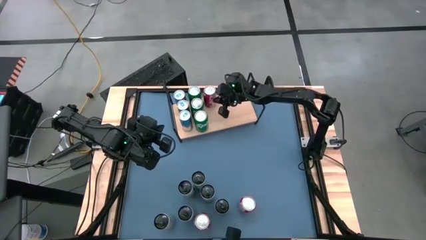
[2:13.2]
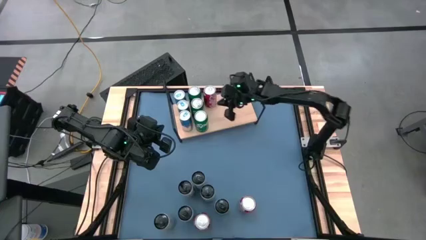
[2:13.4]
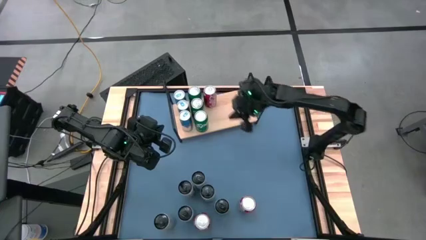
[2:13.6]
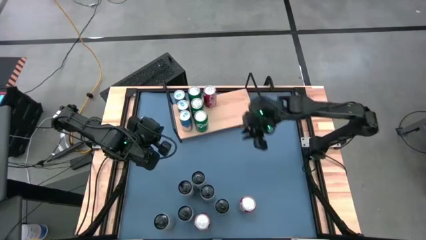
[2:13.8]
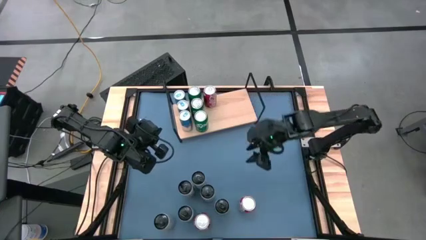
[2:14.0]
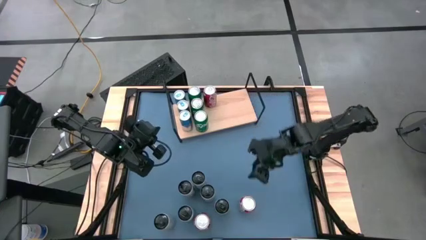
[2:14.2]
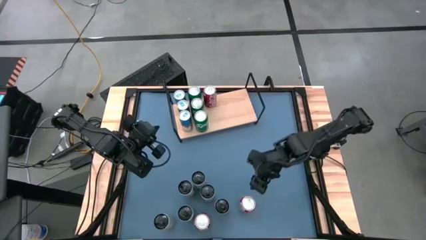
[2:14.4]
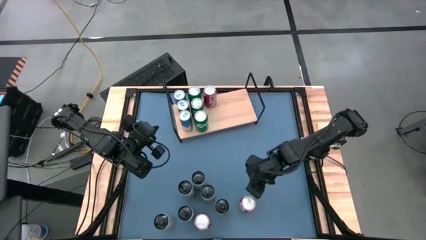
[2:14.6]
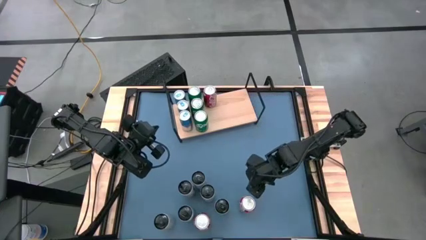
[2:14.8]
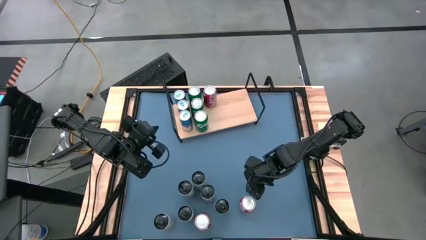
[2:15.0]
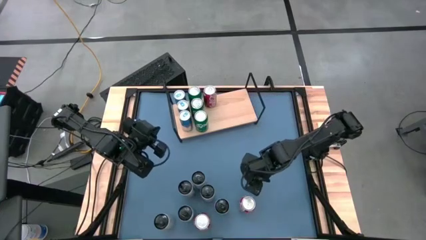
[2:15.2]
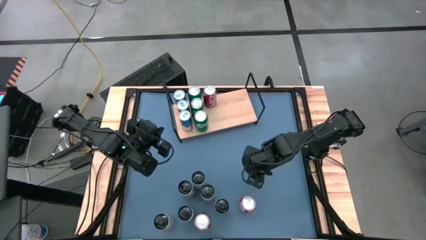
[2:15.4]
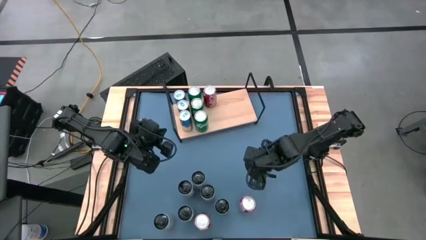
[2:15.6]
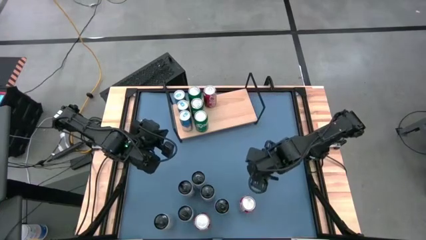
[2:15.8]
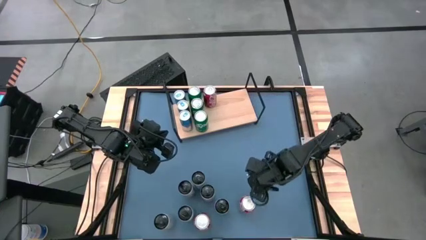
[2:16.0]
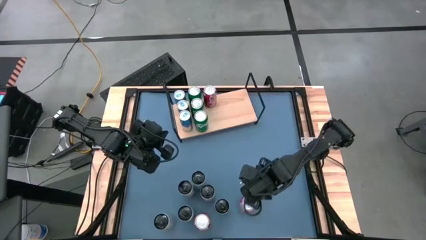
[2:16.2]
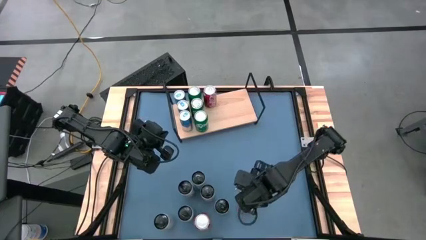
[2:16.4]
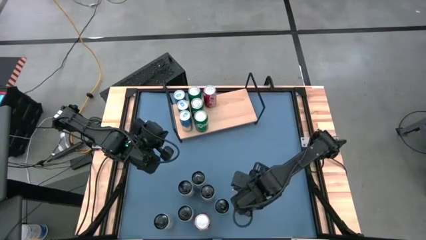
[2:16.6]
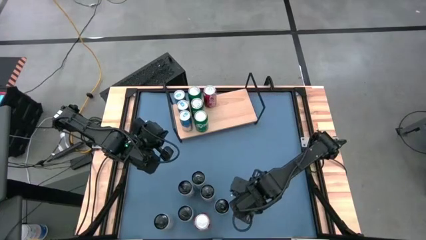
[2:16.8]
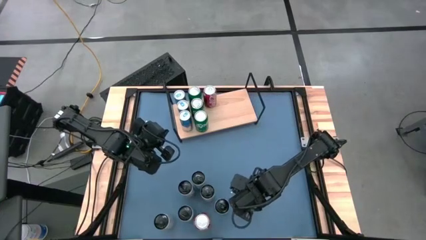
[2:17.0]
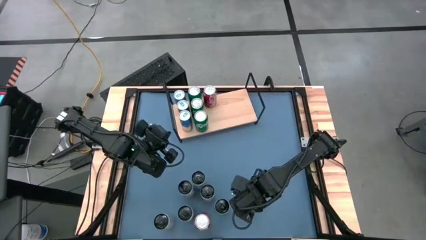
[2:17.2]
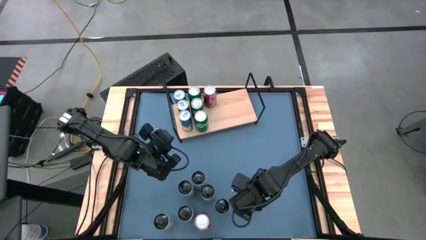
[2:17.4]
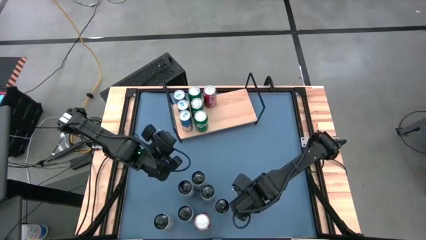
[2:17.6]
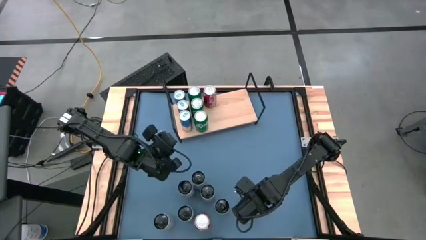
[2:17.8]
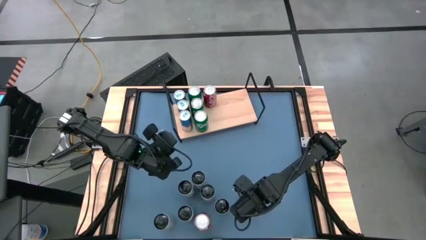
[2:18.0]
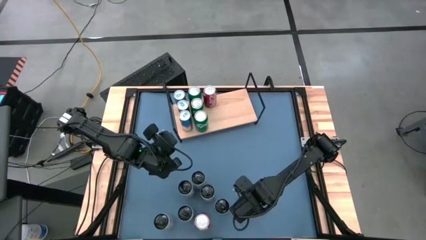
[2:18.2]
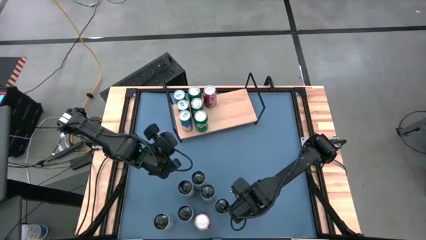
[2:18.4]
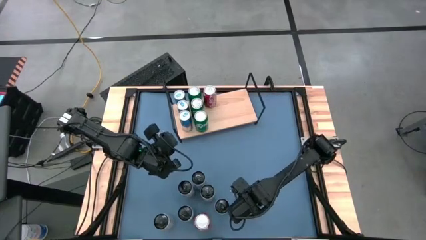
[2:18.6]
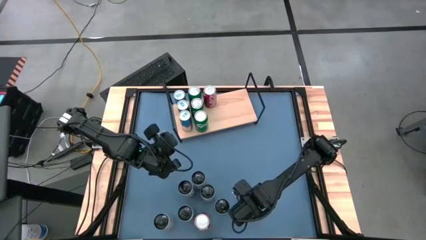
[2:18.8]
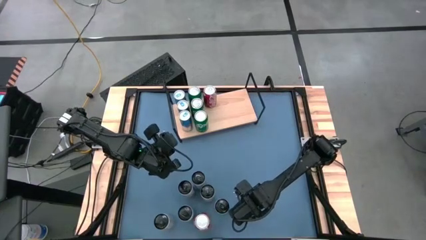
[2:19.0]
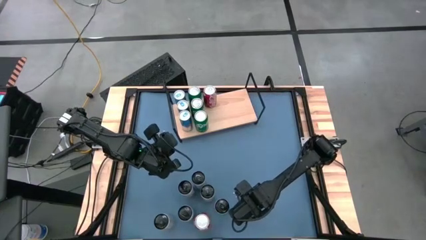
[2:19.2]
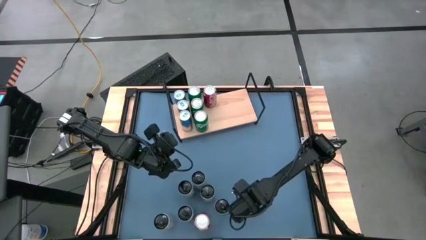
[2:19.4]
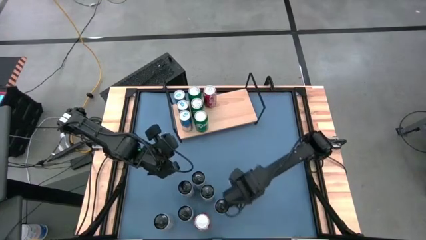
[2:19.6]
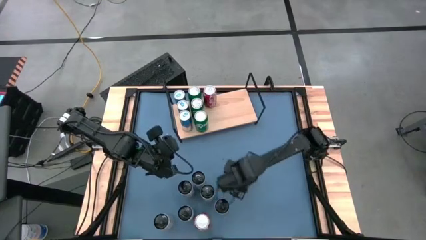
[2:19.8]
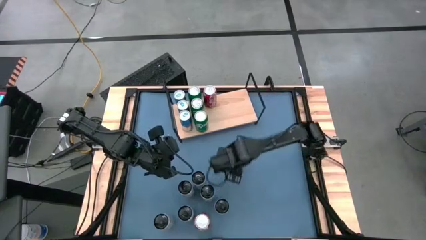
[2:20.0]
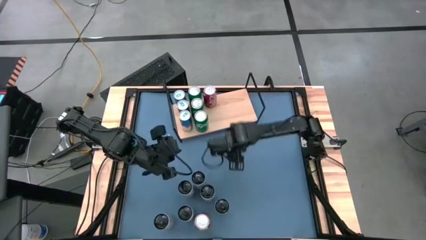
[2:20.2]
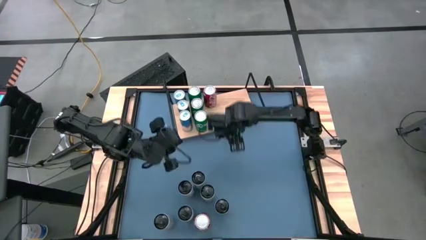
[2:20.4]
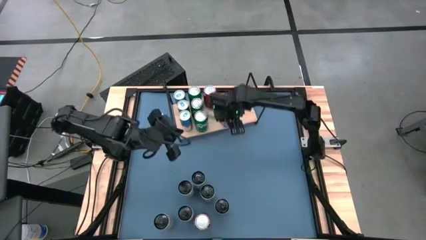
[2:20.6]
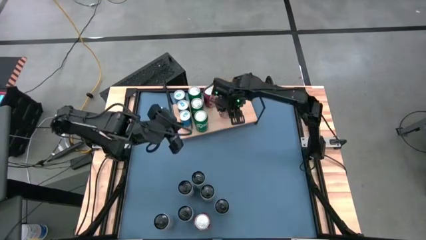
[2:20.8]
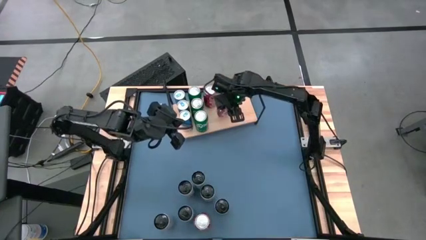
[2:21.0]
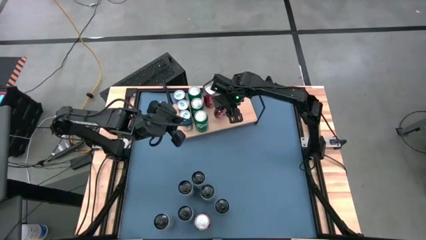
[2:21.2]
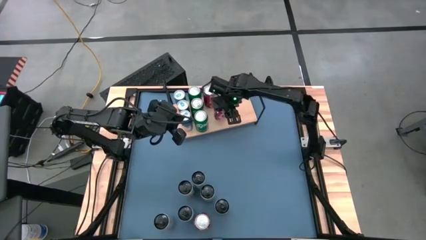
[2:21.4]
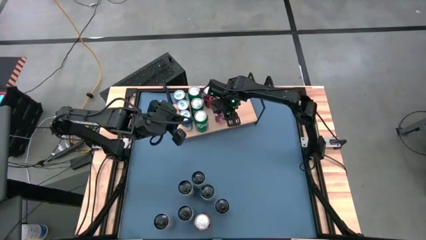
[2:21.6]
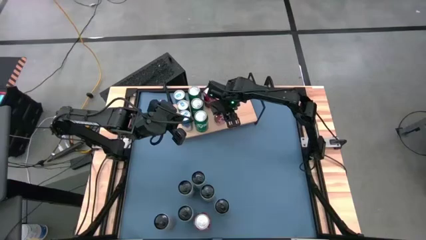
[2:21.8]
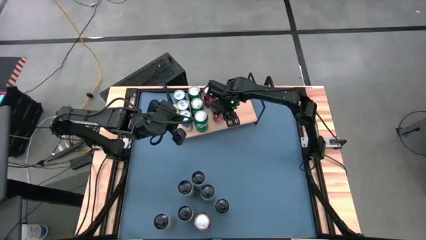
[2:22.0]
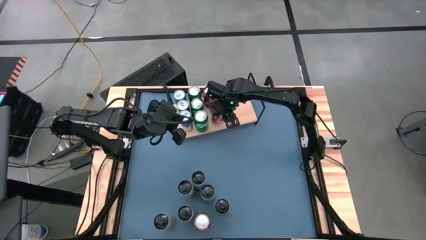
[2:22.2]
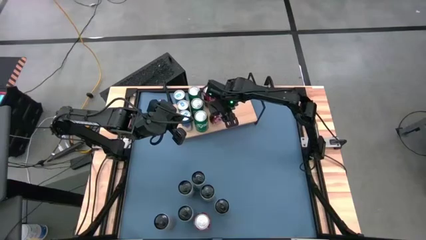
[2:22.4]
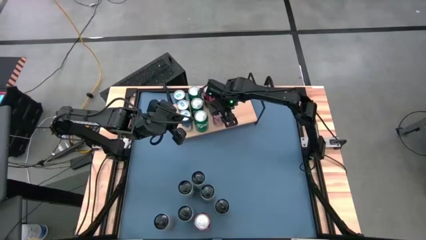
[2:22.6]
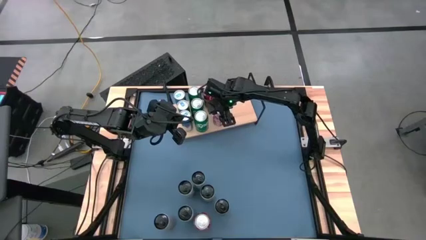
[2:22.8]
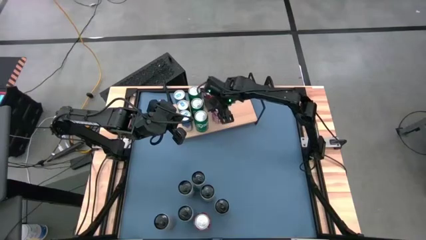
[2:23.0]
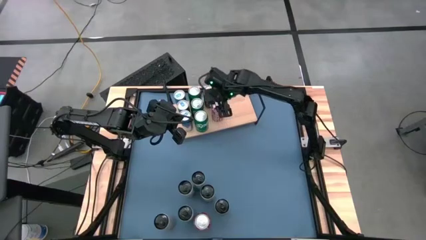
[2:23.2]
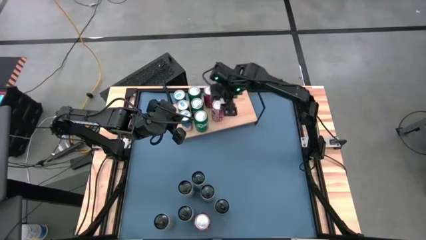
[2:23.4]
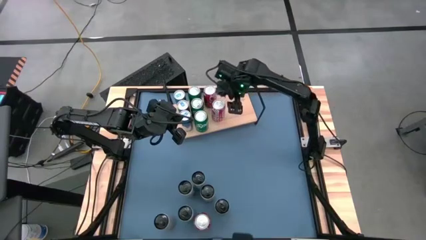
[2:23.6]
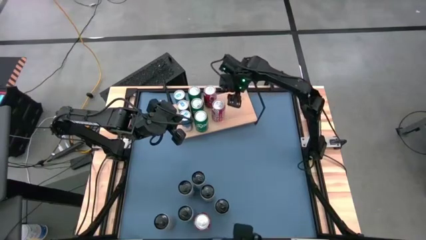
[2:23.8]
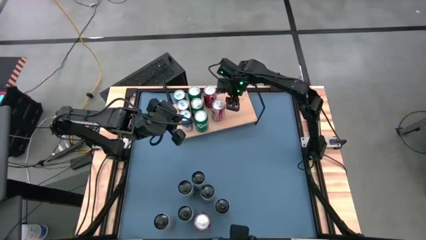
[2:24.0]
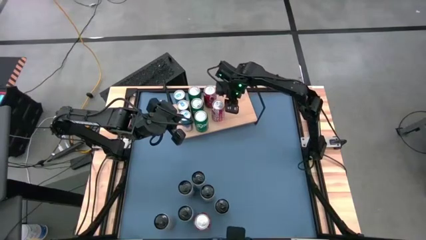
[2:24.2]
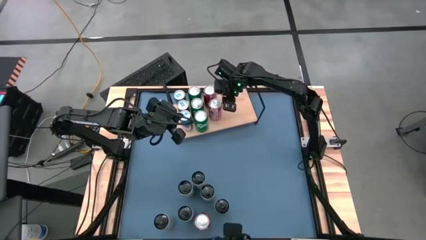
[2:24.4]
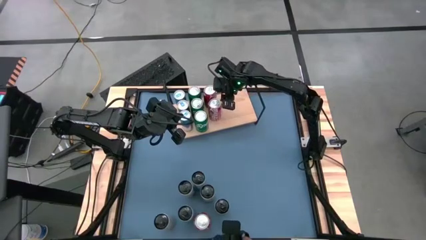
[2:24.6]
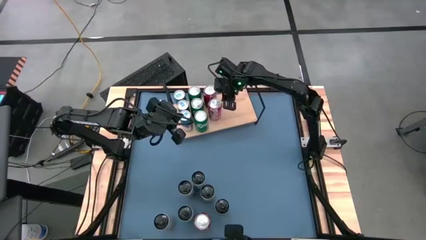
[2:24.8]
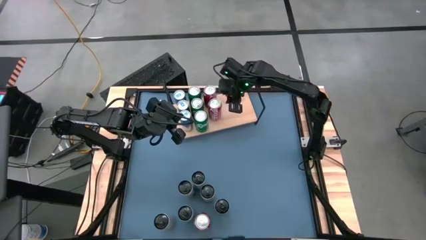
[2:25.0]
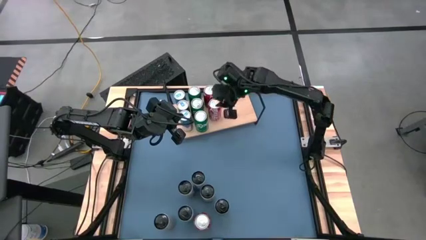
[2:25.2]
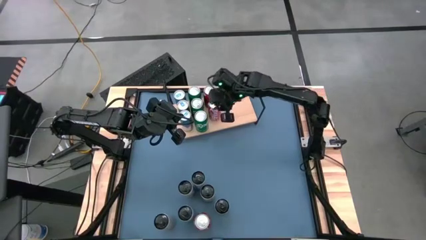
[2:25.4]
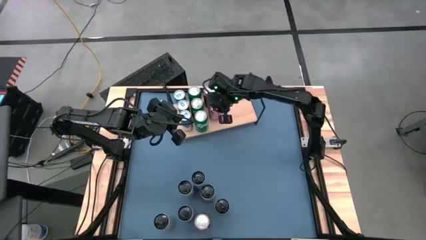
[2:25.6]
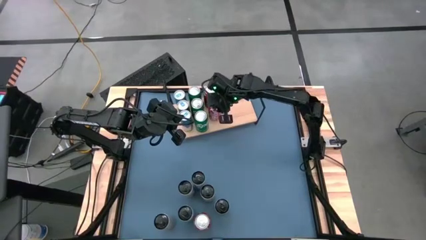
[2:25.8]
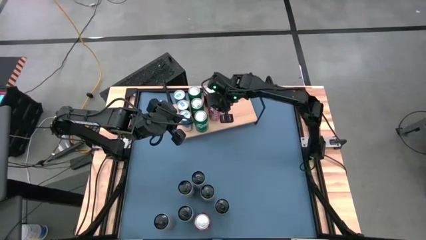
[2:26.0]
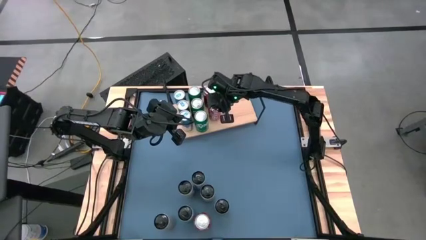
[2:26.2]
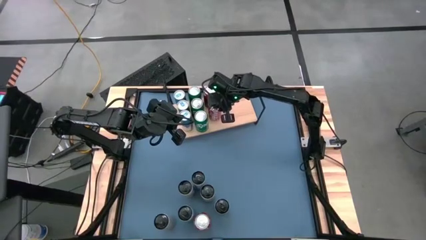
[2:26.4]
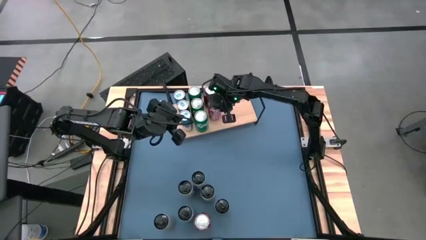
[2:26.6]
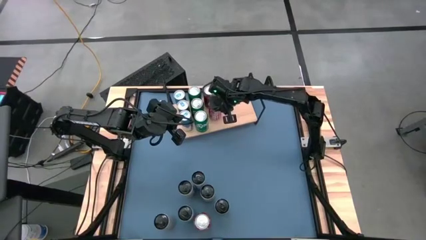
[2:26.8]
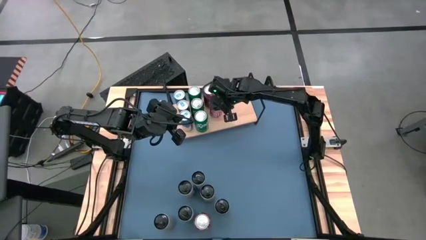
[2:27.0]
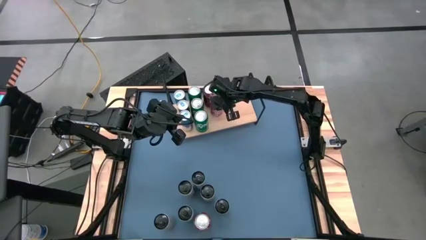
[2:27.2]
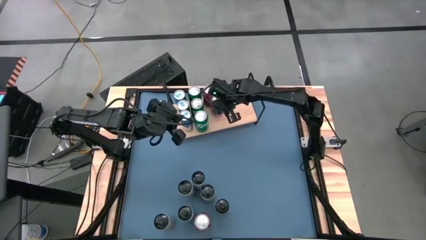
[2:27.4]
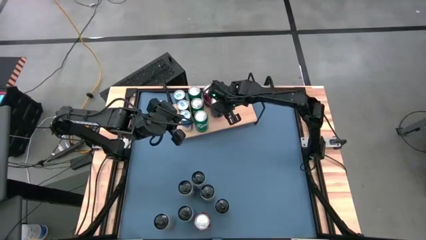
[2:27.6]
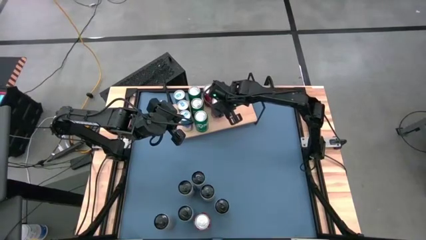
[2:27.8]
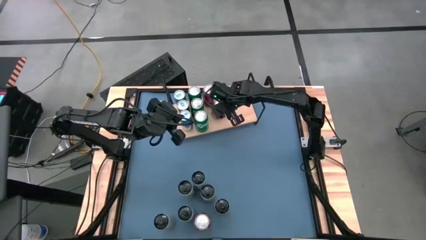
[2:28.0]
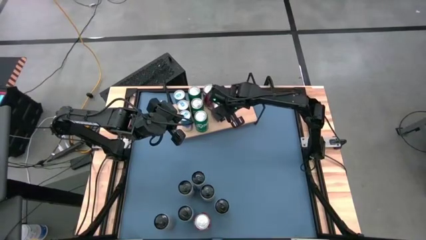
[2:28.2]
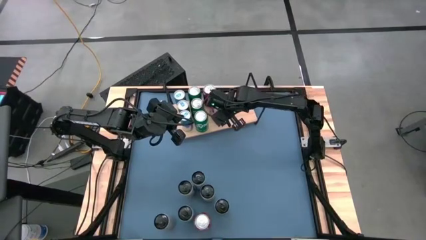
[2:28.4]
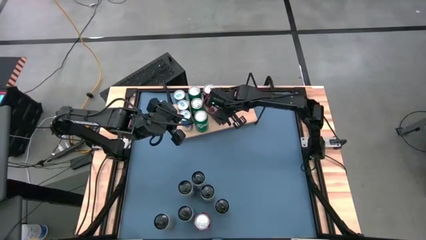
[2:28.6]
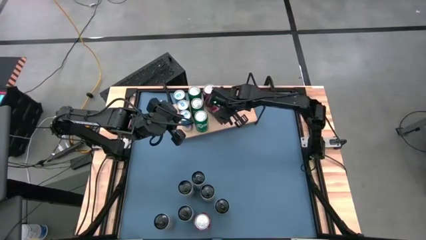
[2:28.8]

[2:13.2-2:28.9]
Task: Place canned beverage on shelf
Put the top red soda can on the shelf aligned with the other red soda can
